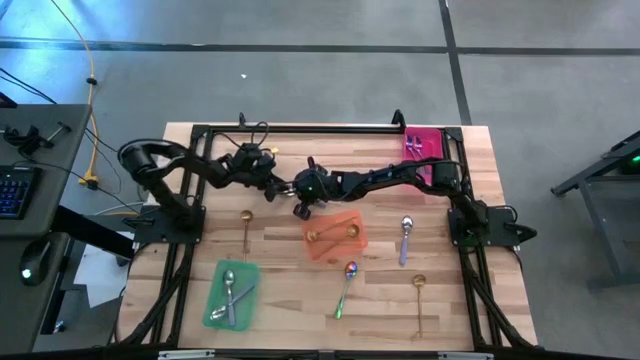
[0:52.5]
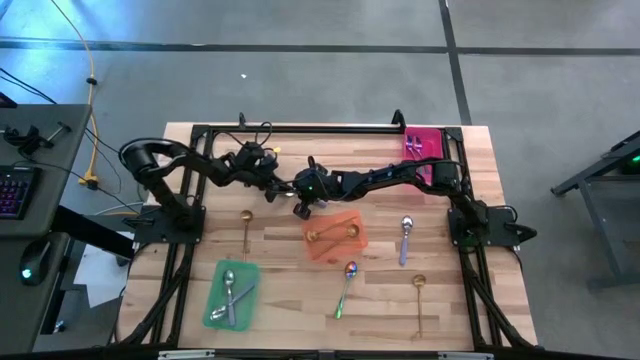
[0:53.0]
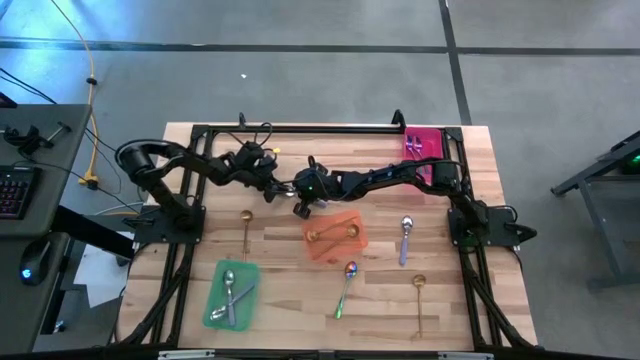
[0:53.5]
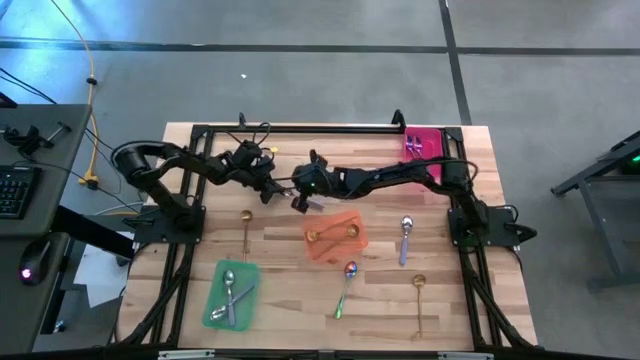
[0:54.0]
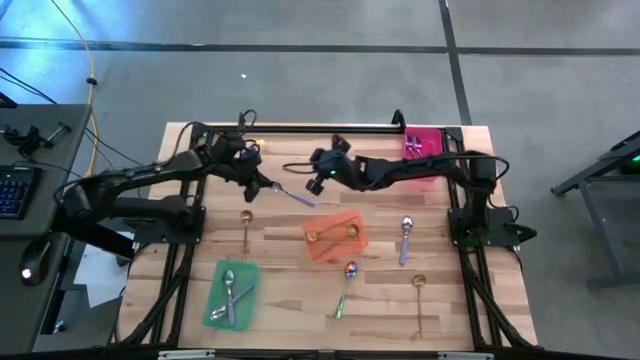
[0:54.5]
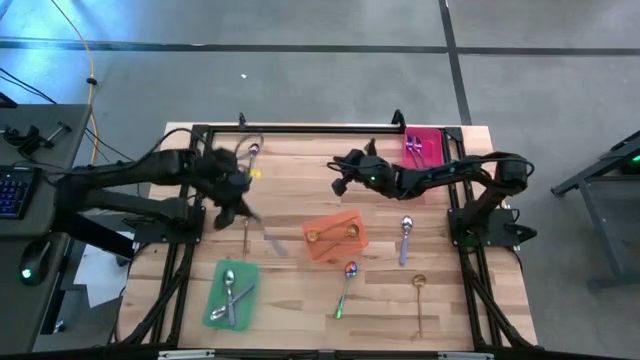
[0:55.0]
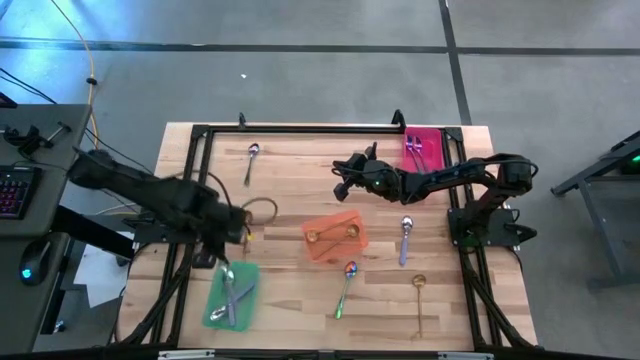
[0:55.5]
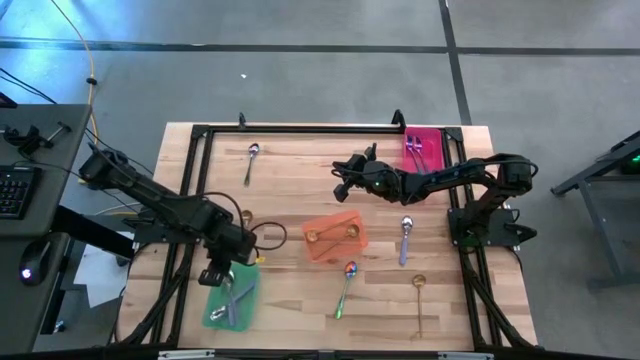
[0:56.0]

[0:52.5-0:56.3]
Task: Sort silverware by color (type)
Put the top violet spoon into the green bin

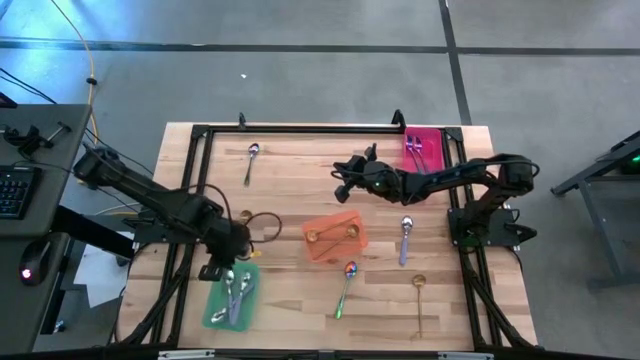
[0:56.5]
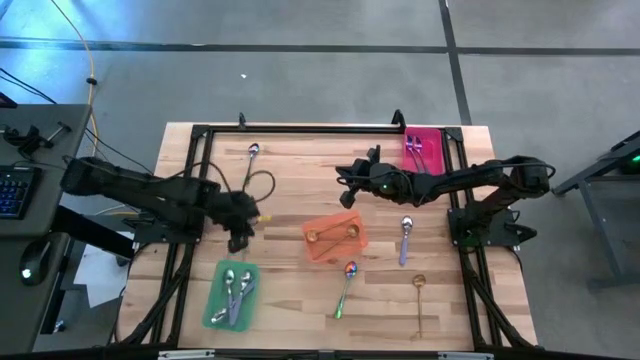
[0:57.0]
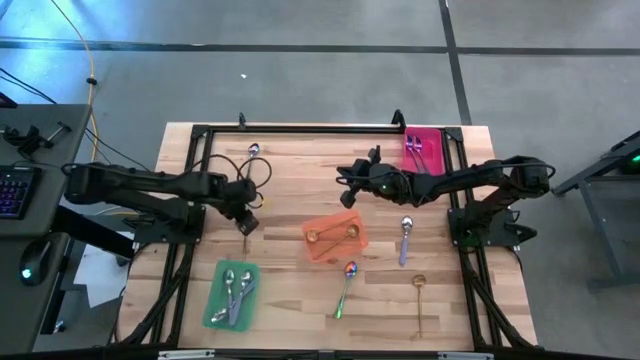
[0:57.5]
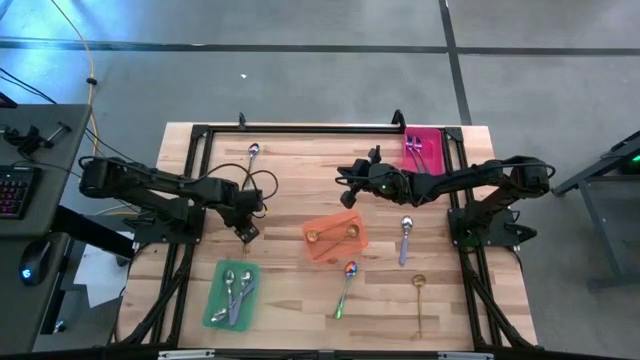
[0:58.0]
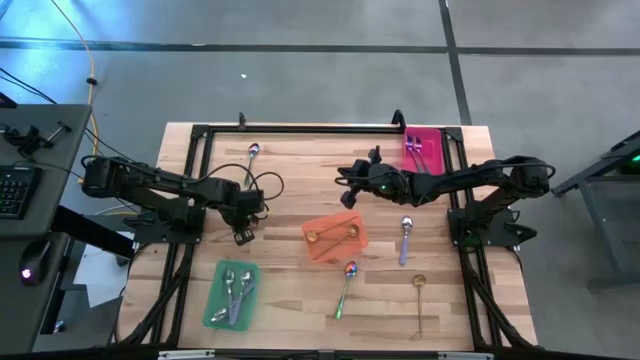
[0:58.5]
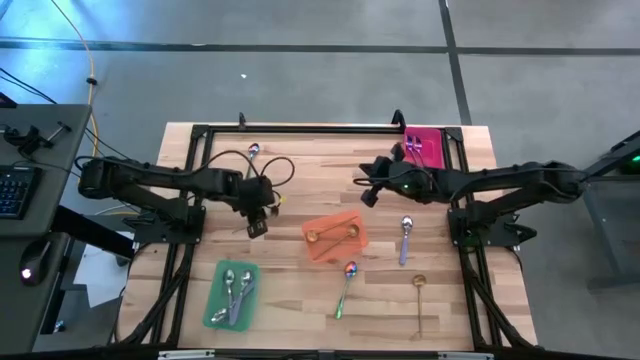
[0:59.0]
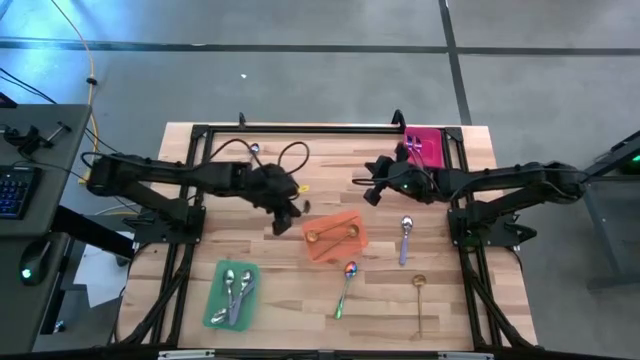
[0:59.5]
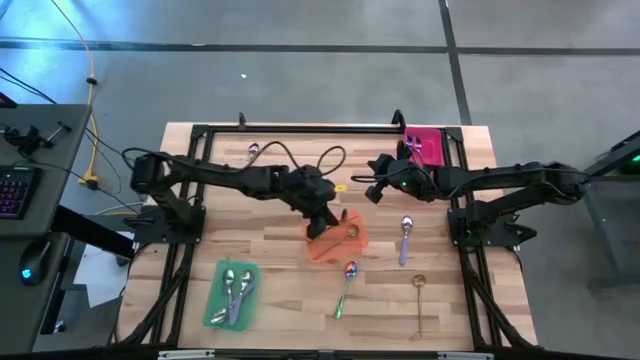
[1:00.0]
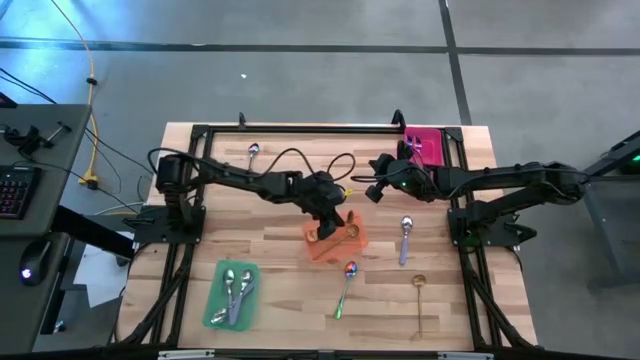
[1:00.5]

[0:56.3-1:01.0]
Put the top gold spoon into the orange bin

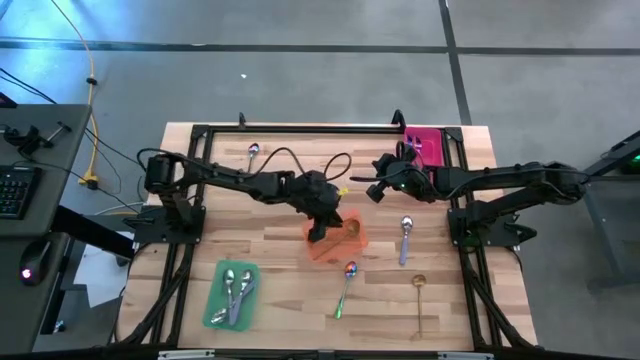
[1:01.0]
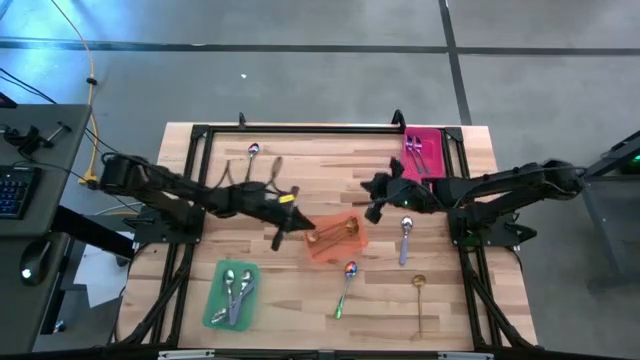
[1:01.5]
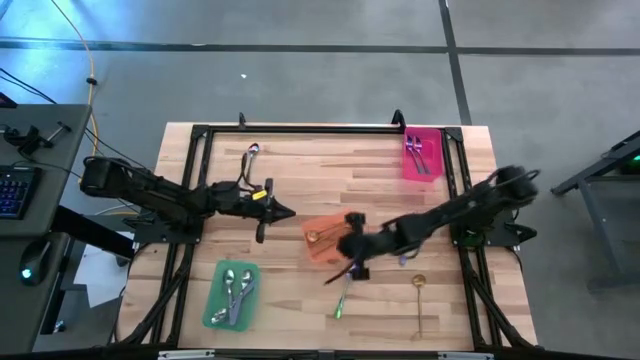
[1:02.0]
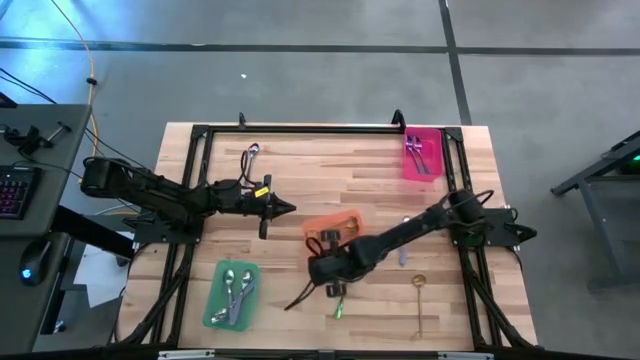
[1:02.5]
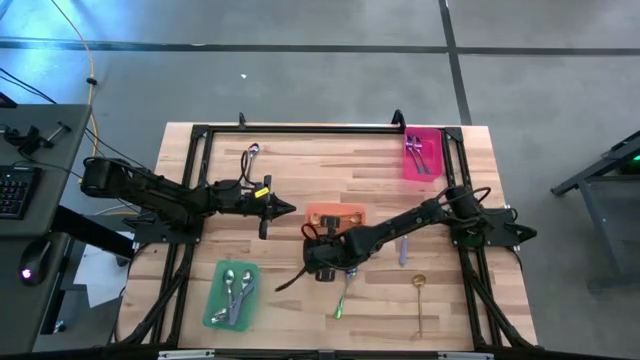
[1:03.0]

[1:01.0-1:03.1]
Adjust the orange bin on the table

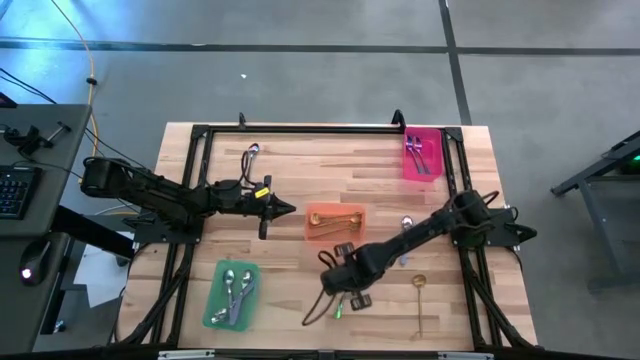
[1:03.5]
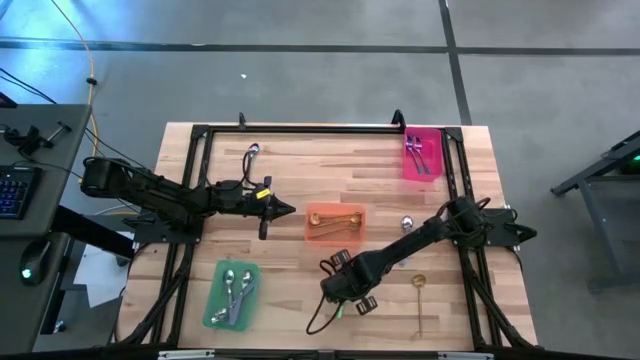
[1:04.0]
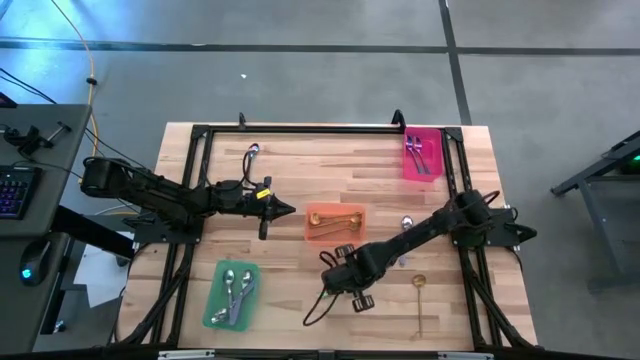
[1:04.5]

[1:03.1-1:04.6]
Put the bottom multicolored spoon into the red bin

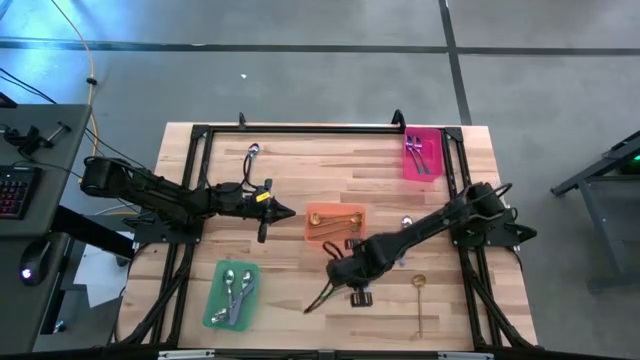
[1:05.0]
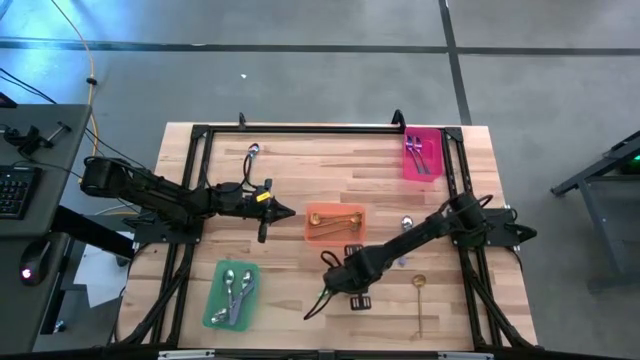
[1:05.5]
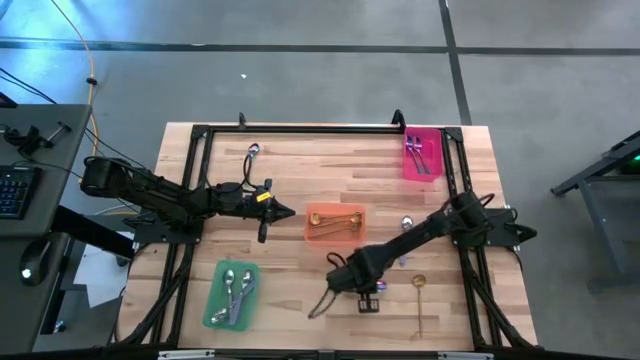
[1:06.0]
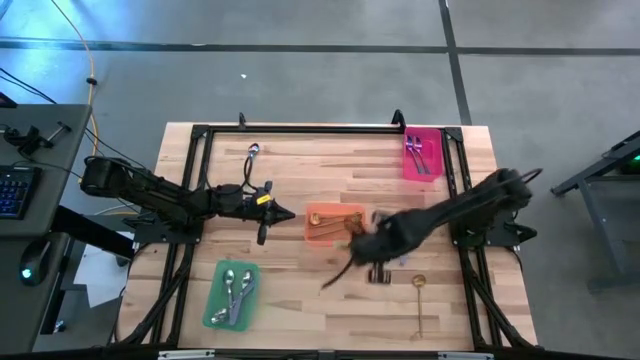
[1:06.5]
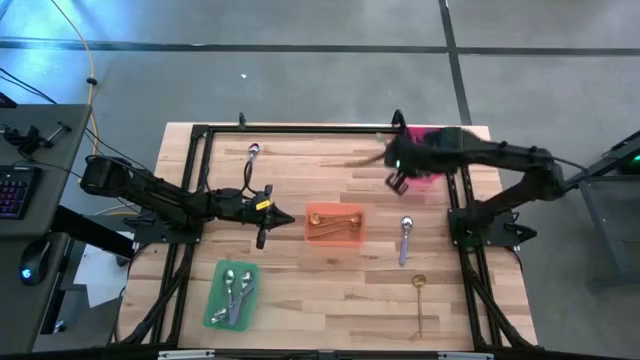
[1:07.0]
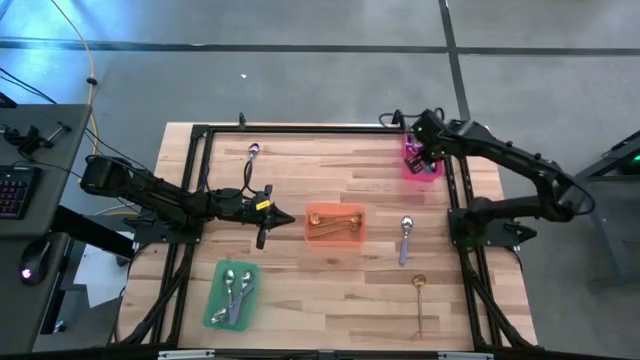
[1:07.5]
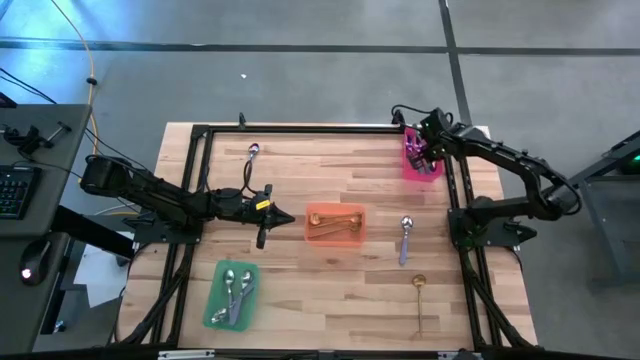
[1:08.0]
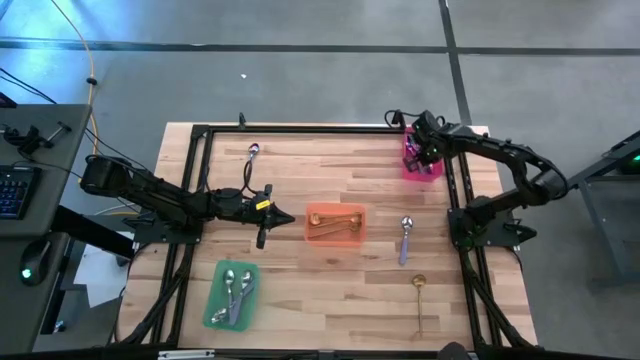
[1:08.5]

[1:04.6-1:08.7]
Put the bottom multicolored spoon into the red bin

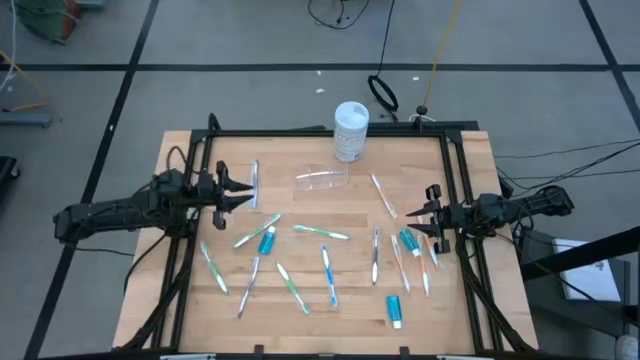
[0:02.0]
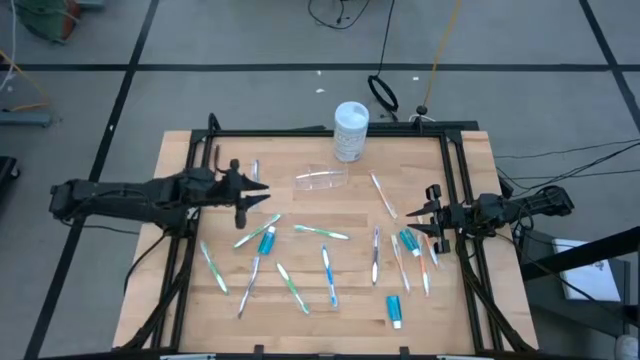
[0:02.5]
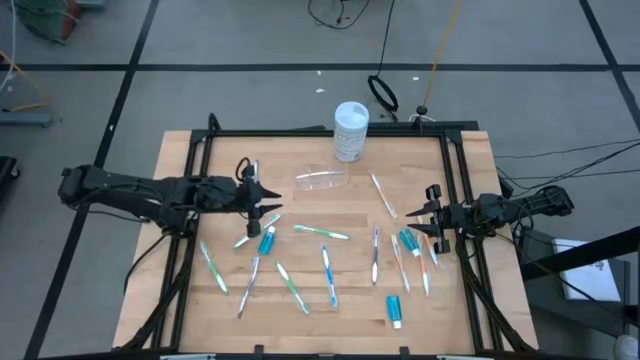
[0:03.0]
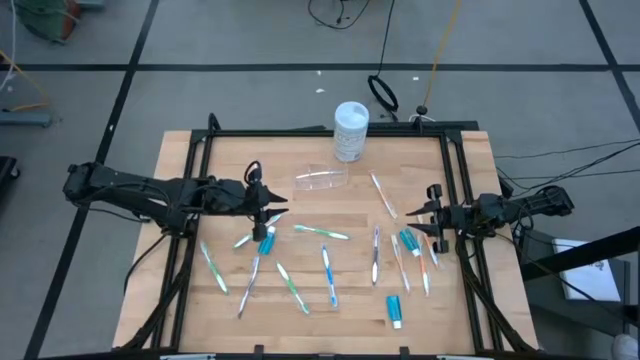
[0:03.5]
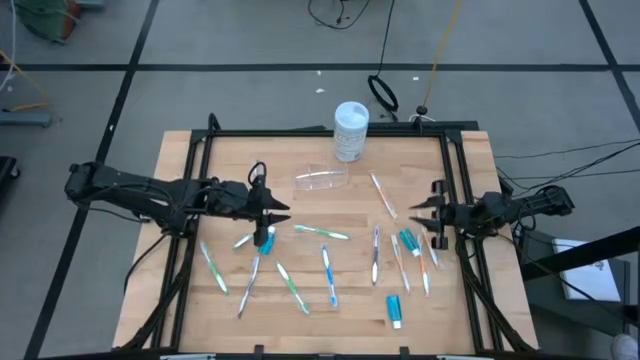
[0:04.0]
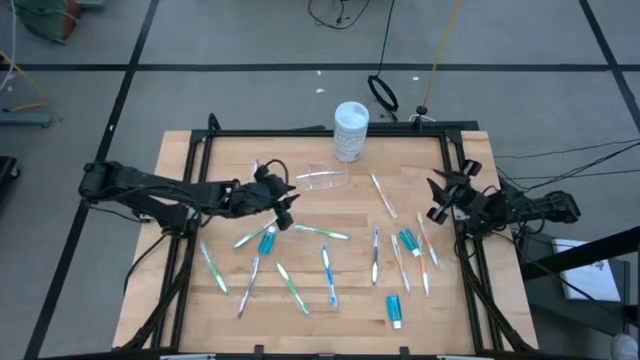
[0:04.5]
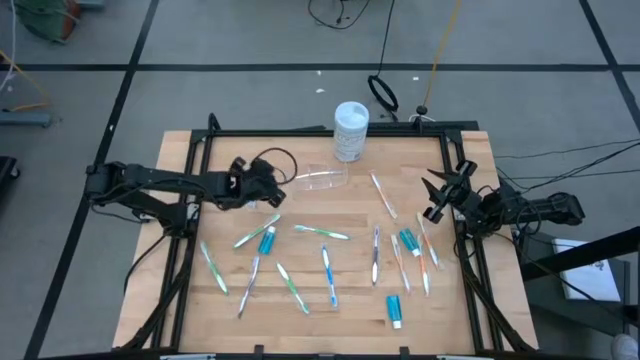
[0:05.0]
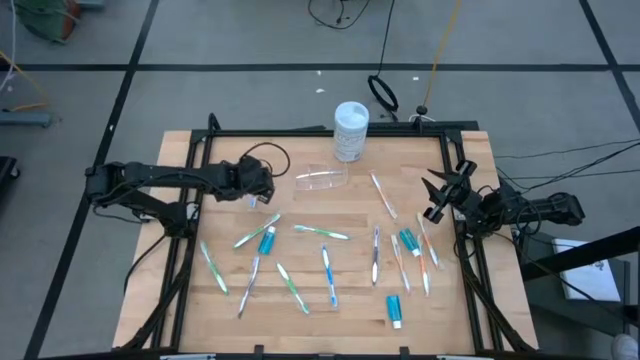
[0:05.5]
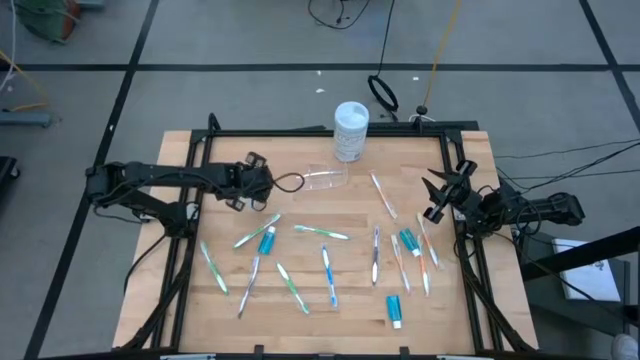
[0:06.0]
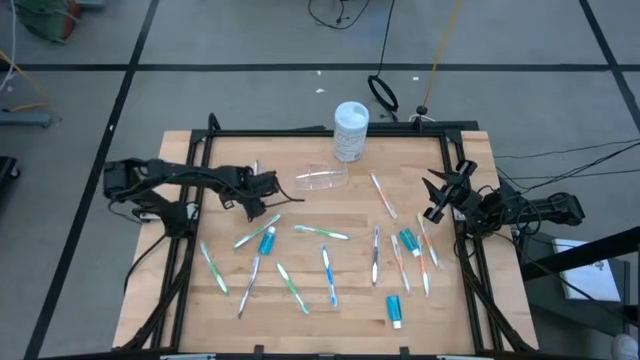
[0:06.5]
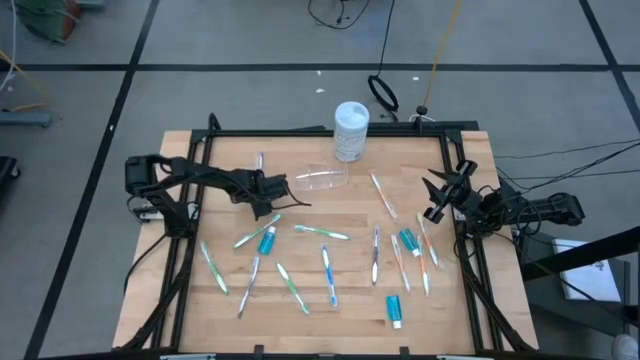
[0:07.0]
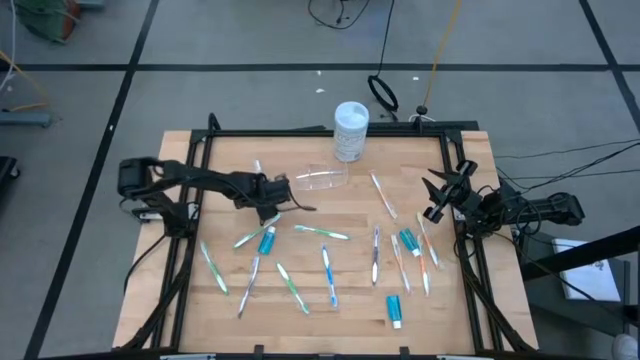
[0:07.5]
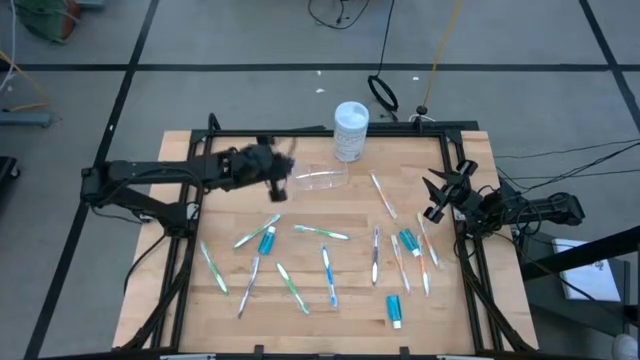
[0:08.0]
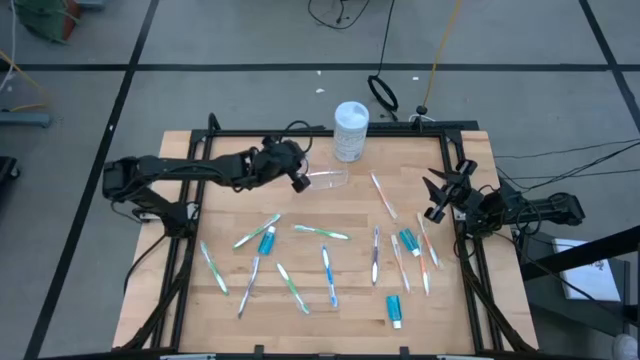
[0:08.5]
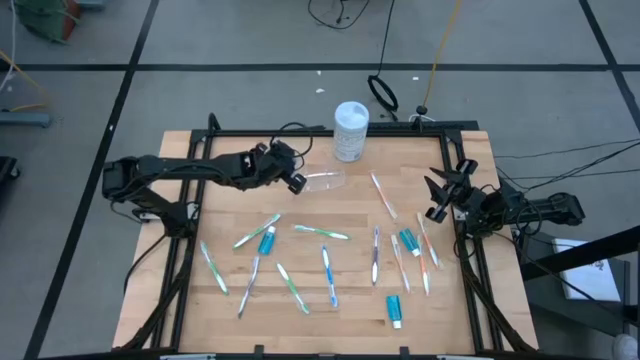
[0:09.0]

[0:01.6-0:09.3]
Task: Pick & Place toothbrushing station
Put the blue toothbrush into the transparent organizer
